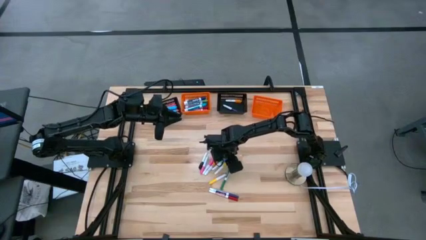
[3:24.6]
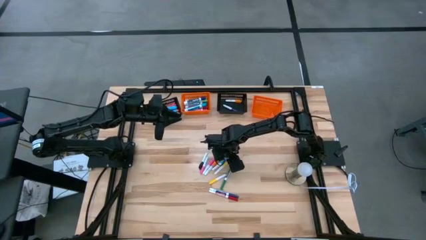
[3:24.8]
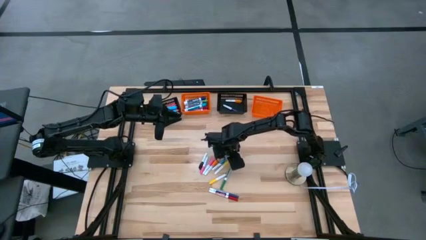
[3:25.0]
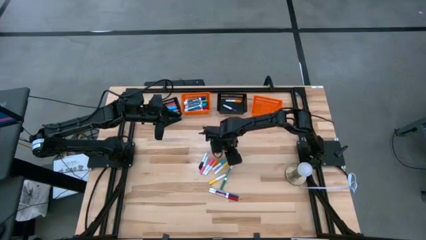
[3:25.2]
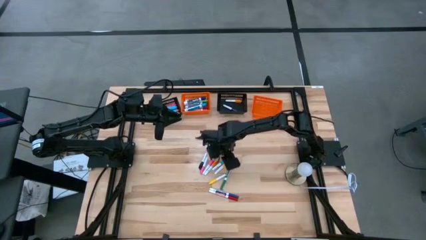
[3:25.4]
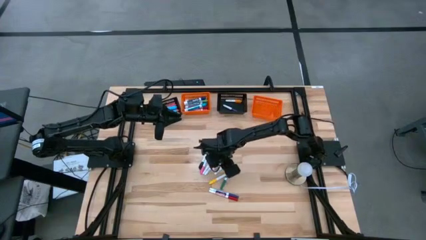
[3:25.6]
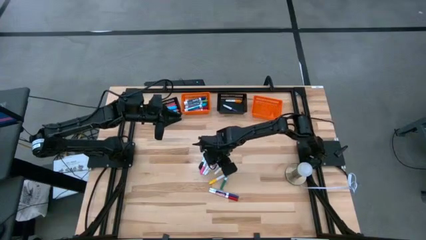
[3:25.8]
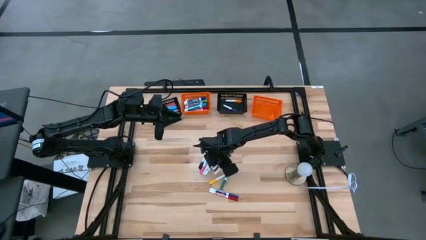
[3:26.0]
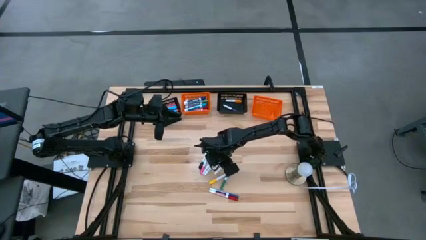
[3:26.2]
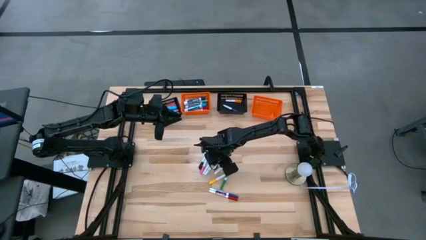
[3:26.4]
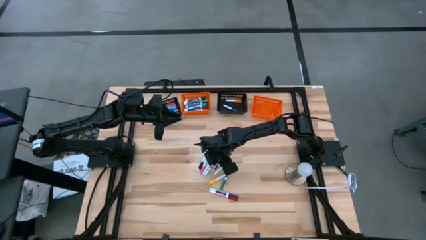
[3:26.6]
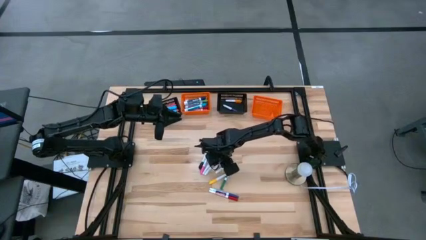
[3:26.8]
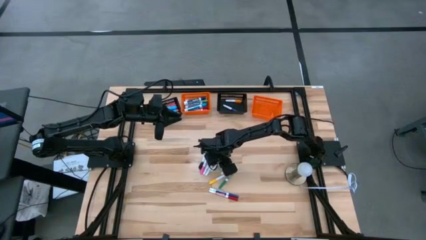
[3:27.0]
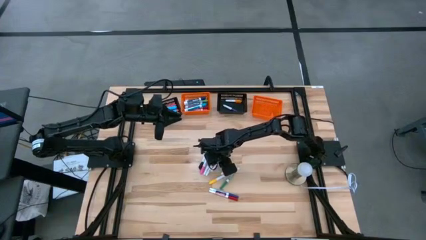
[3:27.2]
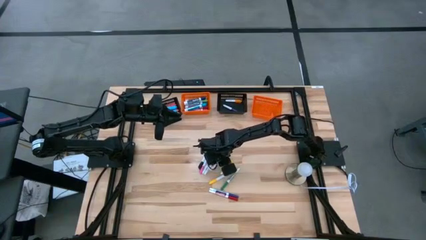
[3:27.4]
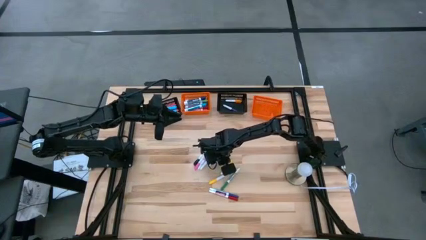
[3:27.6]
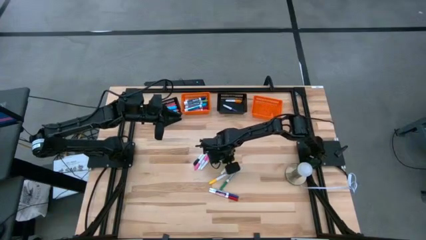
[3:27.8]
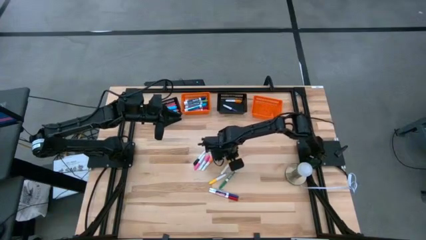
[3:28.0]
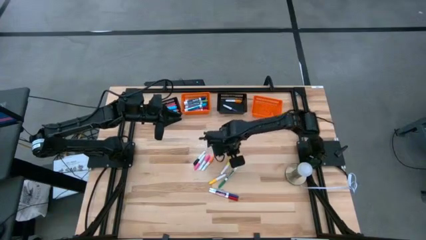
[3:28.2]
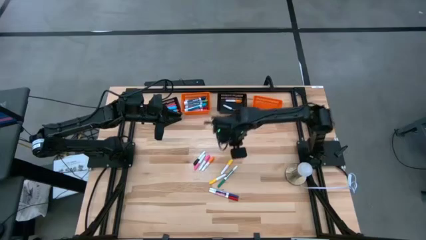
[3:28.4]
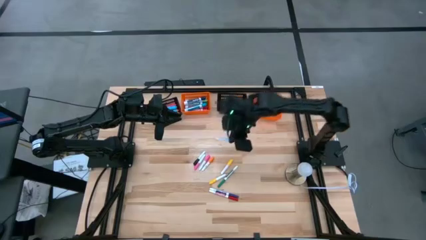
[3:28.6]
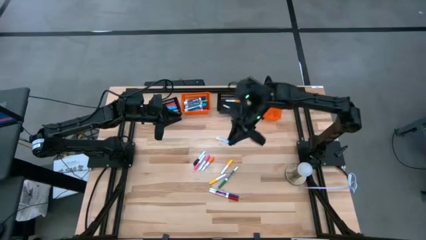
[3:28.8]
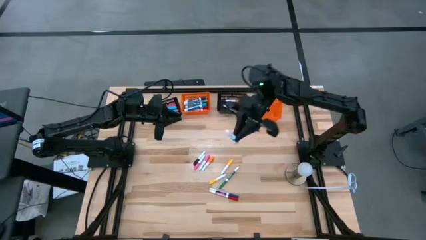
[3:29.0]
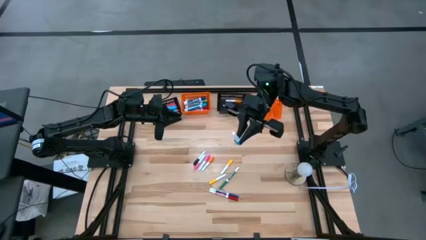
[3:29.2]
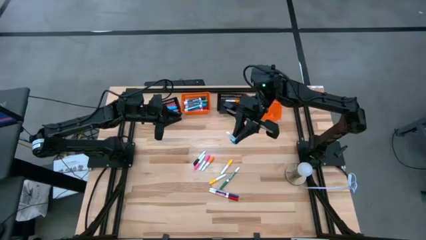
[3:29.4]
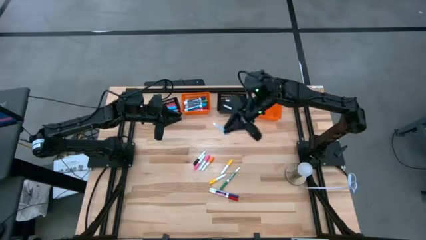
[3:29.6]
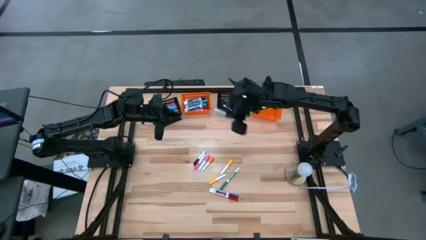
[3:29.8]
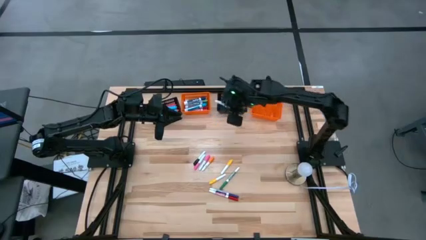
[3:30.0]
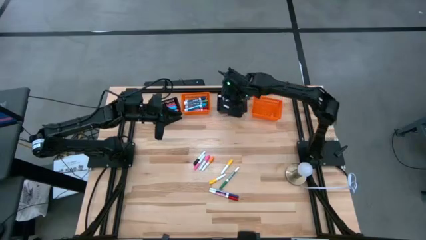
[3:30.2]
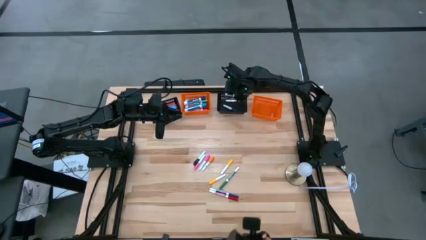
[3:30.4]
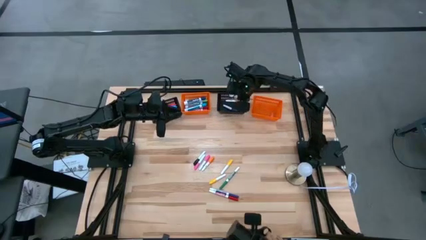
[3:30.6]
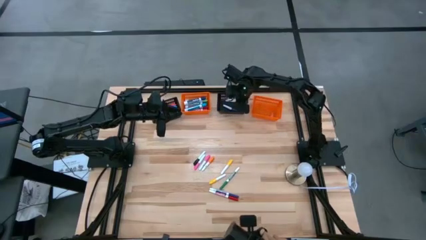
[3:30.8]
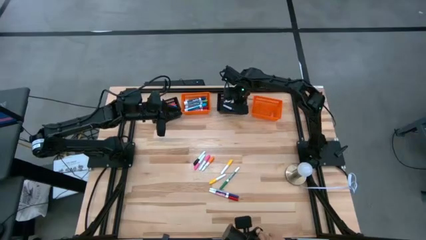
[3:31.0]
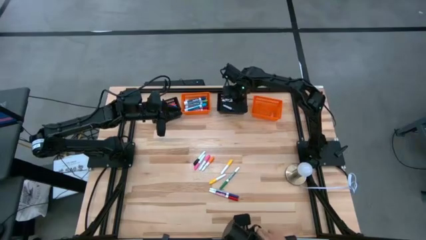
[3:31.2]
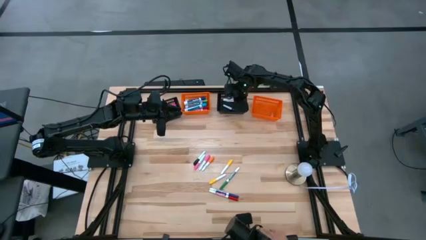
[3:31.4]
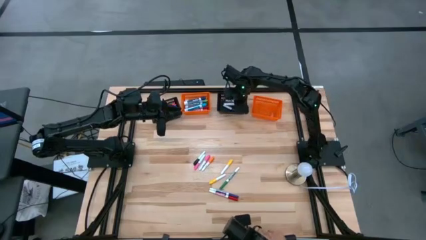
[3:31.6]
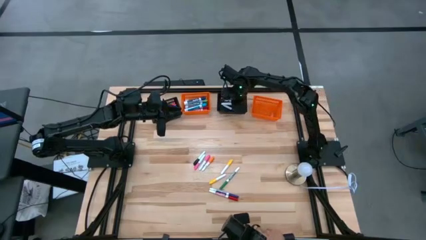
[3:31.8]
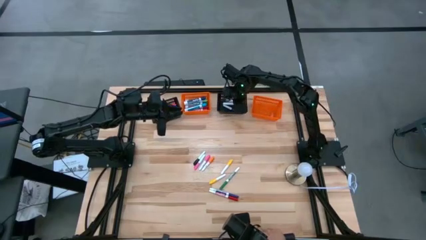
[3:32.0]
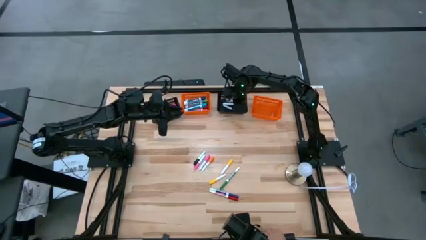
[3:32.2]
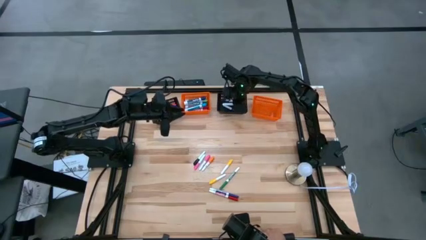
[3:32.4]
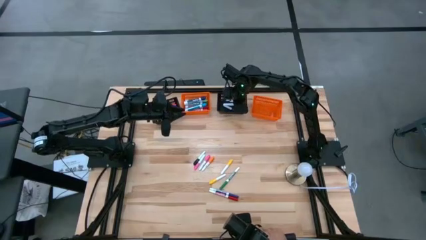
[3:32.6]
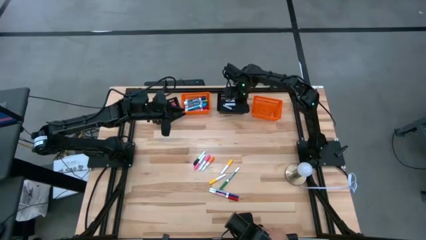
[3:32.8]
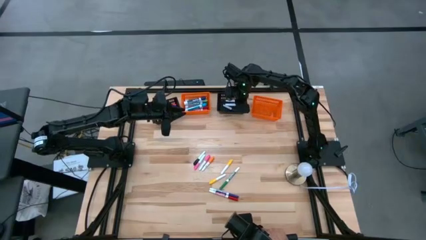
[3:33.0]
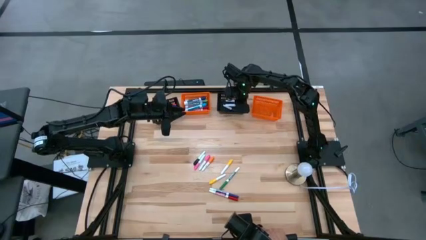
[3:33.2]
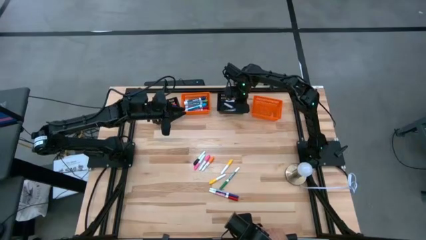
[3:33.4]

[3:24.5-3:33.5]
Task: Pick & Place Markers
Put the light blue mini highlighter into the right black bin

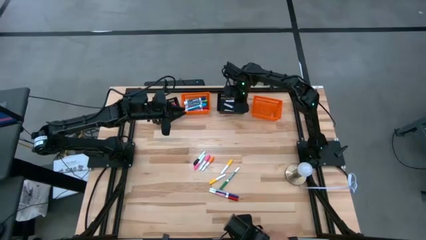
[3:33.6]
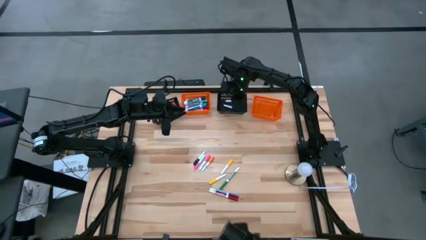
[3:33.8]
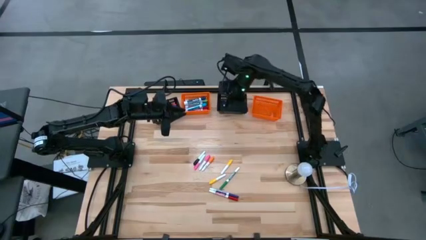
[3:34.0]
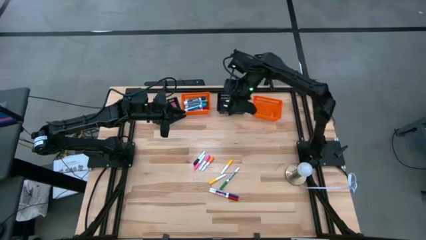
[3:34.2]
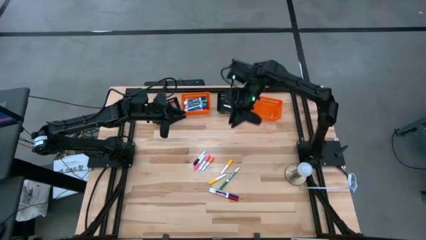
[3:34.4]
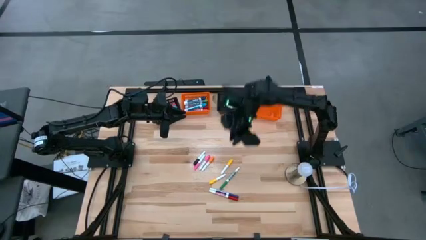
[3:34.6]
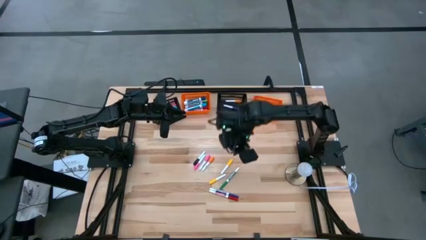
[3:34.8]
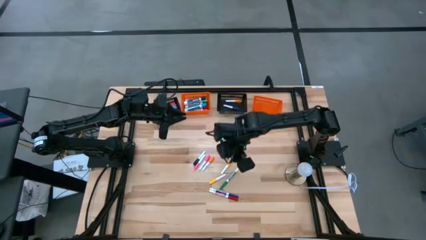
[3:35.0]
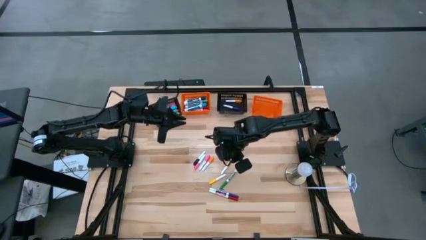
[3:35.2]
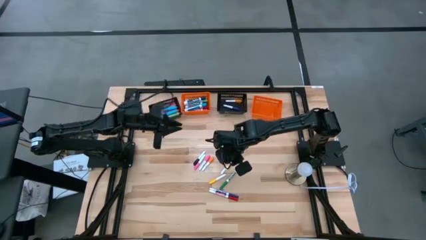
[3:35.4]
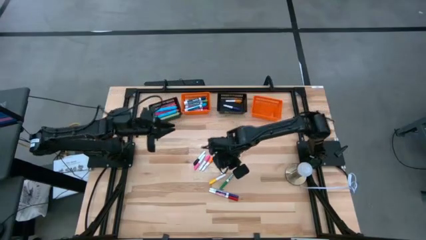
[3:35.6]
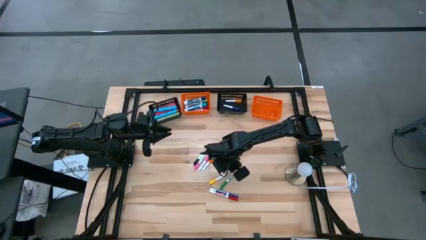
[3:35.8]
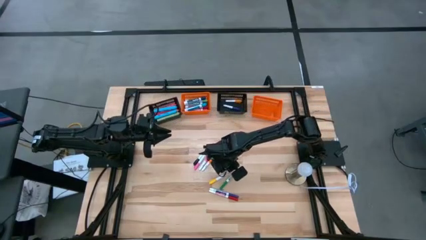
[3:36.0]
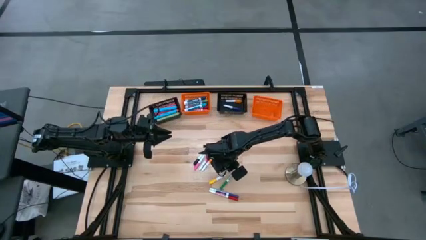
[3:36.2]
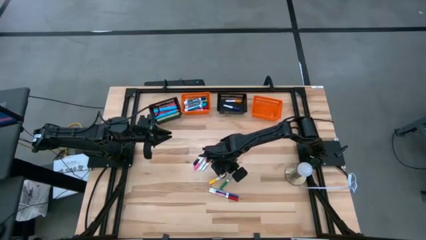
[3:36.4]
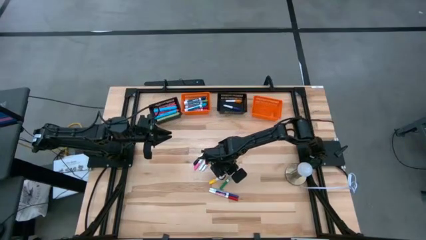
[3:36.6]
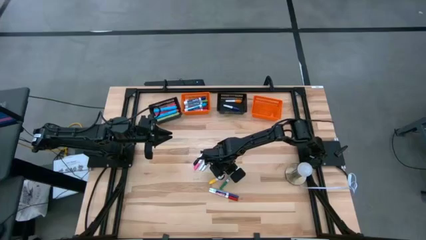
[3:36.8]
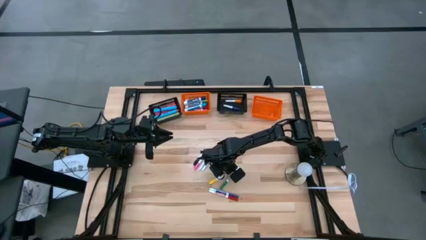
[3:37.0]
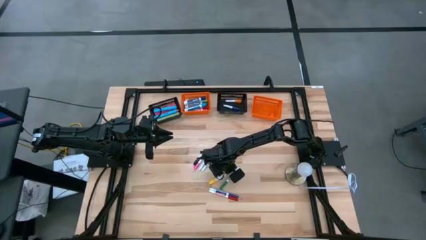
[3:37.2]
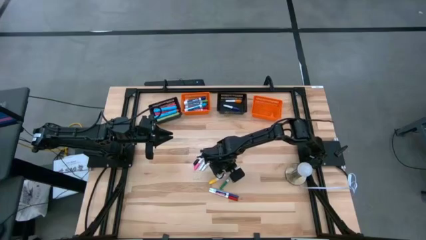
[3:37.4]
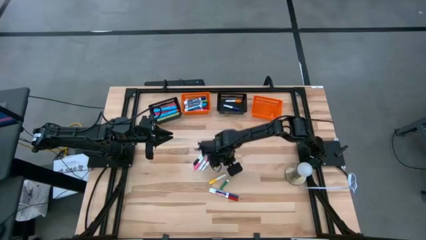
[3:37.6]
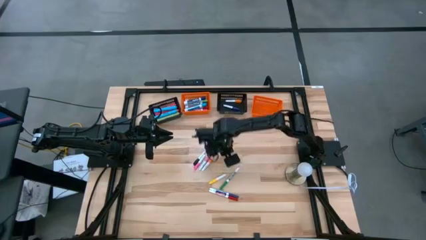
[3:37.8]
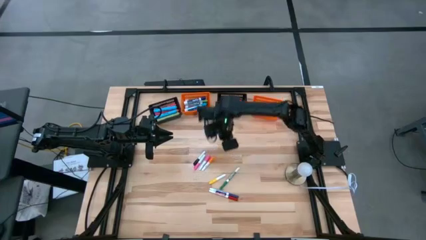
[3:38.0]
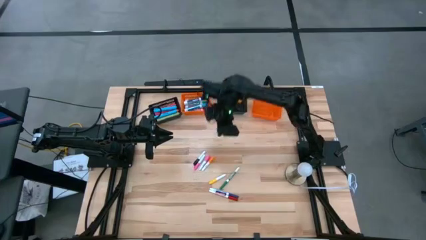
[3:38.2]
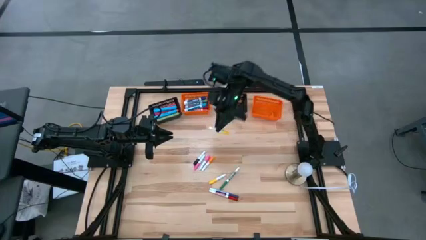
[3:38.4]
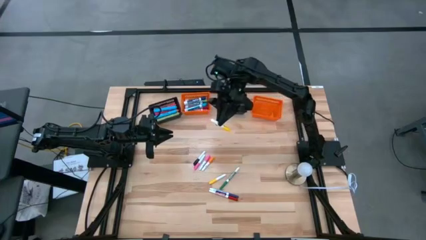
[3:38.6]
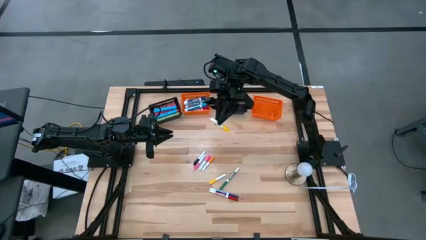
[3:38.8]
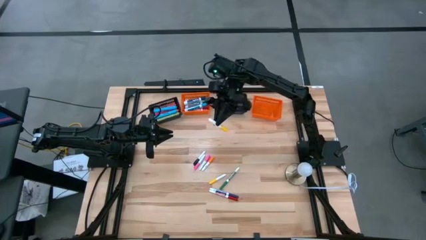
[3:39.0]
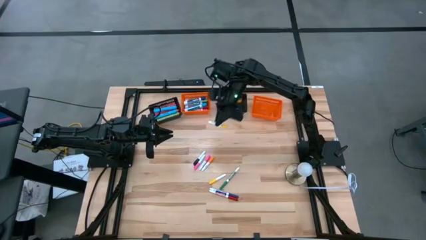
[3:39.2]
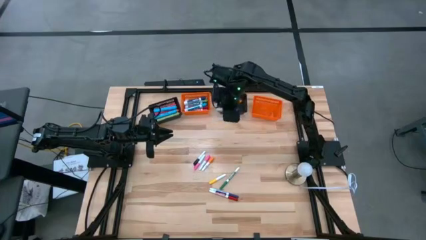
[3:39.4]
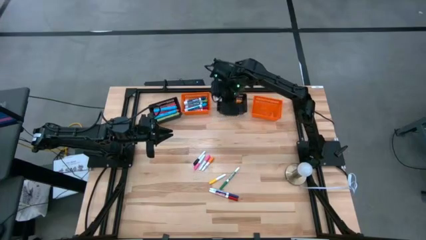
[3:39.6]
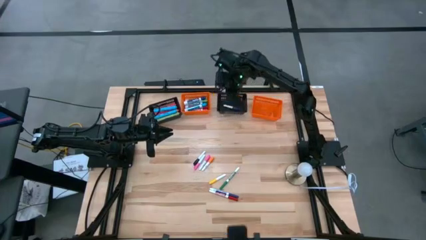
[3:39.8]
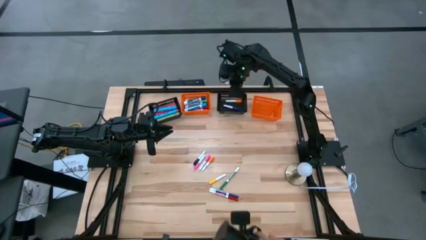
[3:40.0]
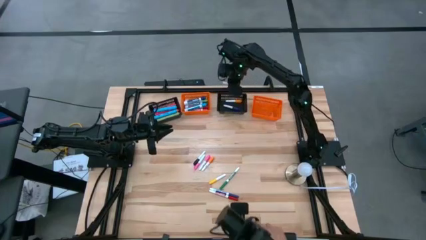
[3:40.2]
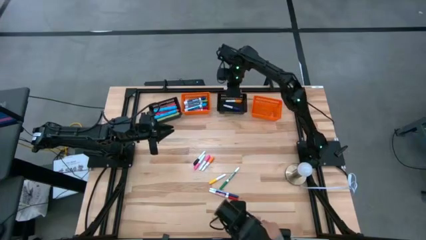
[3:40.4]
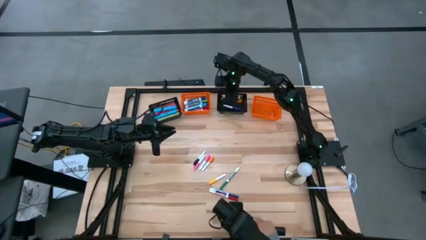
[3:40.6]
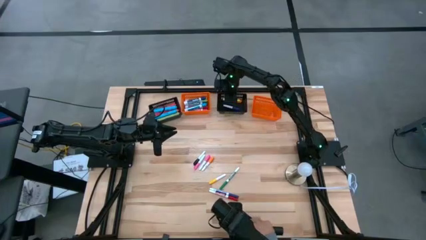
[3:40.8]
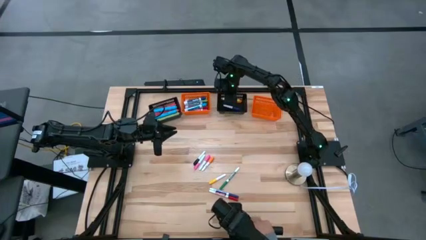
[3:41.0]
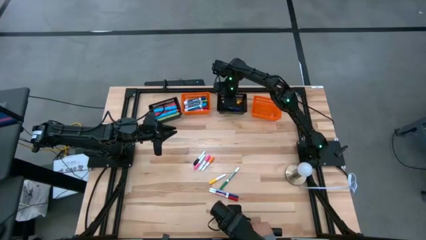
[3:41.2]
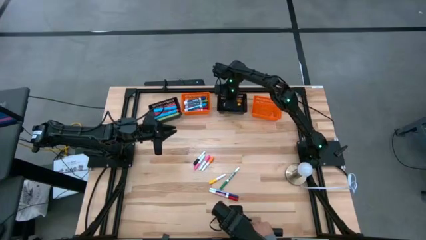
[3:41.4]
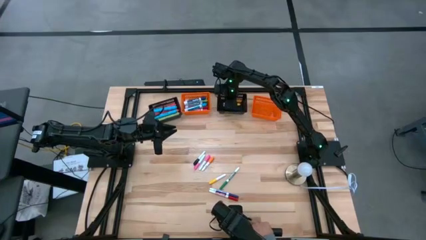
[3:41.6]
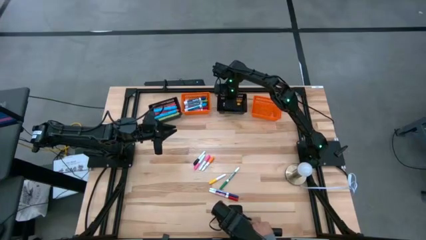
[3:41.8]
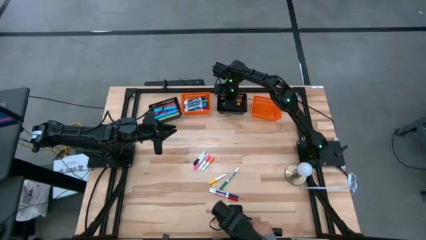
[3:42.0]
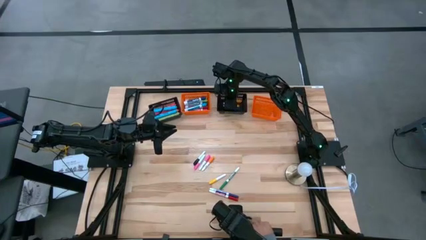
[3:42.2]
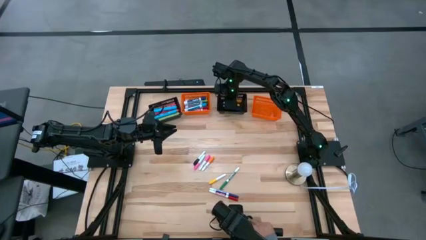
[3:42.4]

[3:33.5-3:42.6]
Put the top yellow mini highlighter into the right black bin
